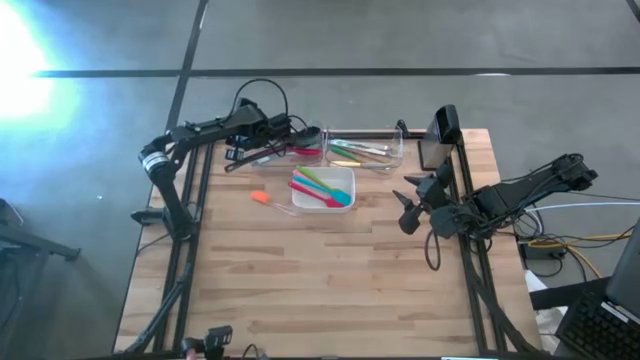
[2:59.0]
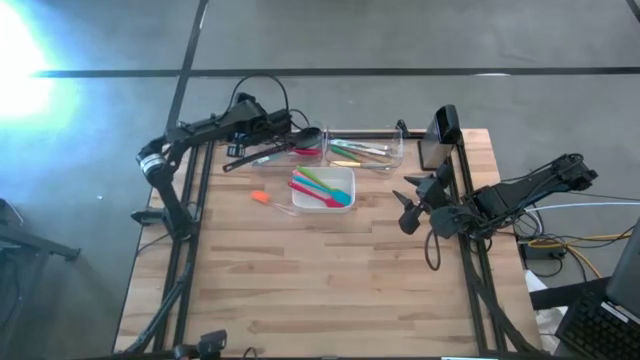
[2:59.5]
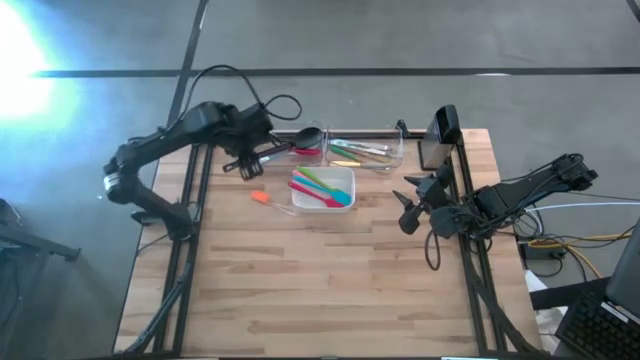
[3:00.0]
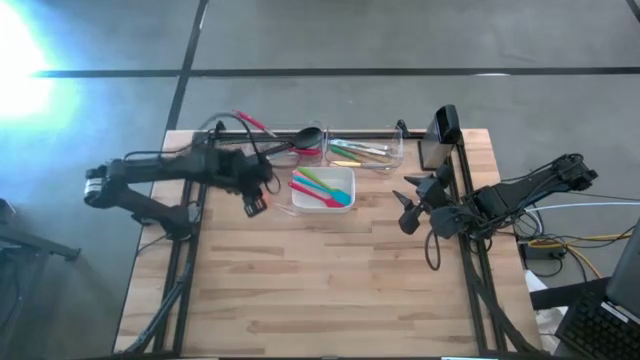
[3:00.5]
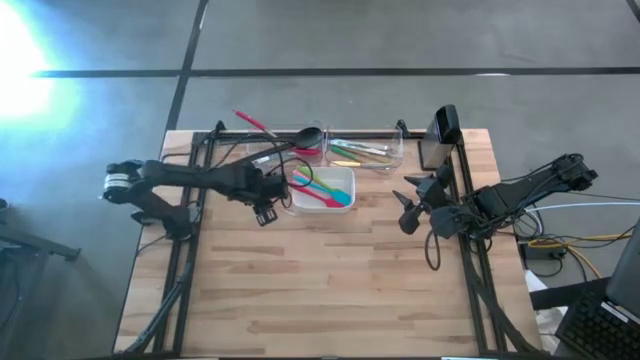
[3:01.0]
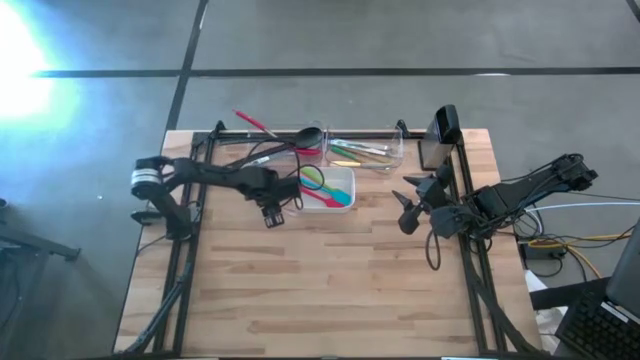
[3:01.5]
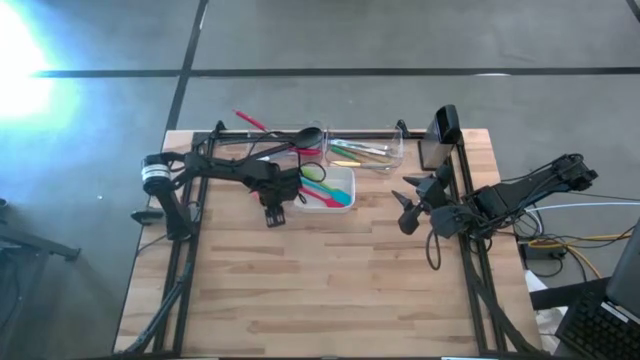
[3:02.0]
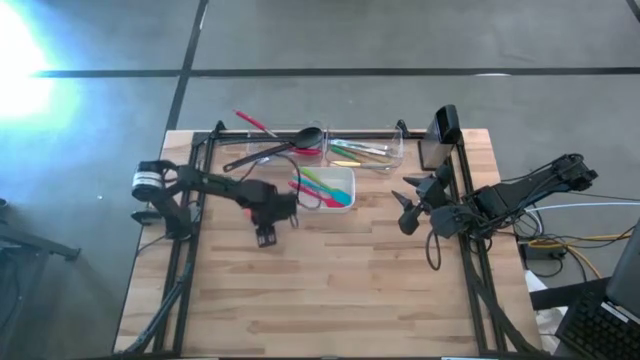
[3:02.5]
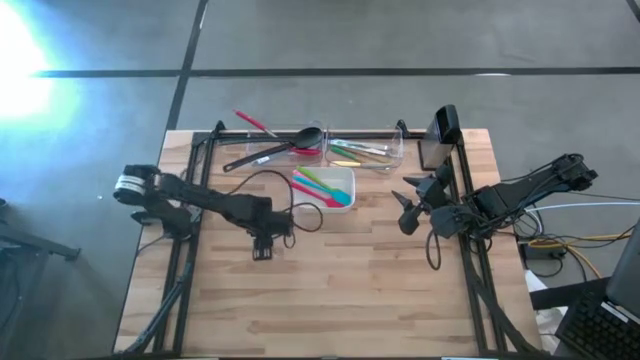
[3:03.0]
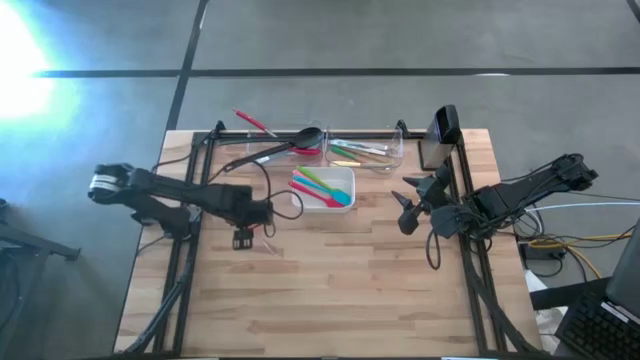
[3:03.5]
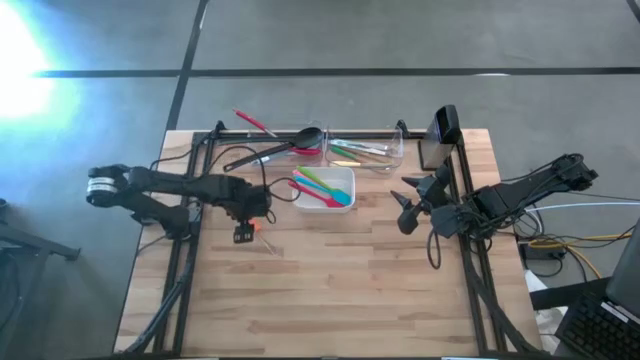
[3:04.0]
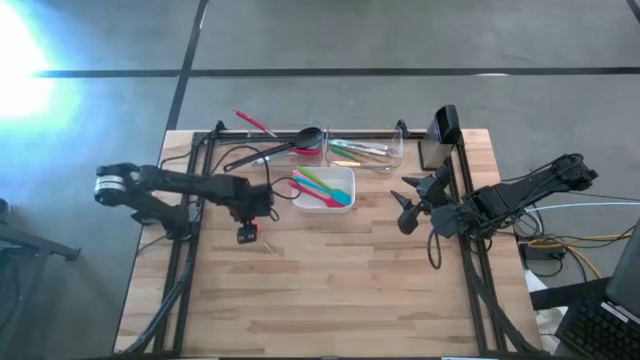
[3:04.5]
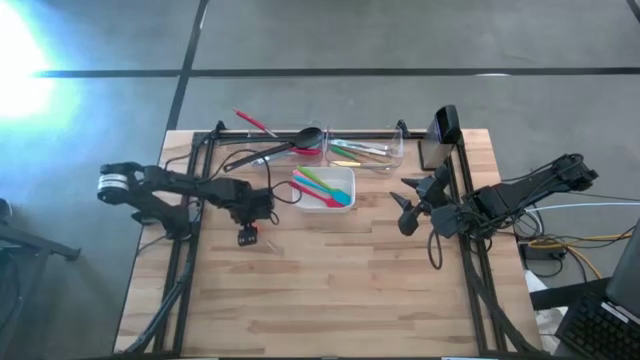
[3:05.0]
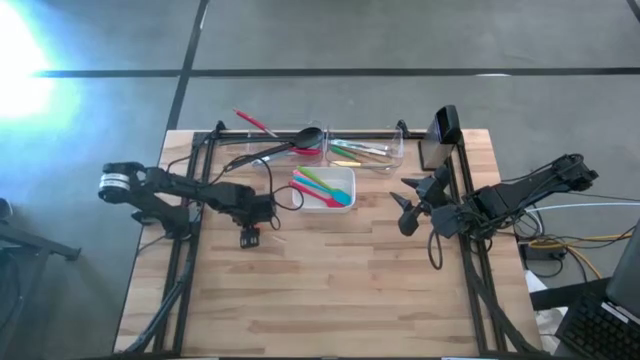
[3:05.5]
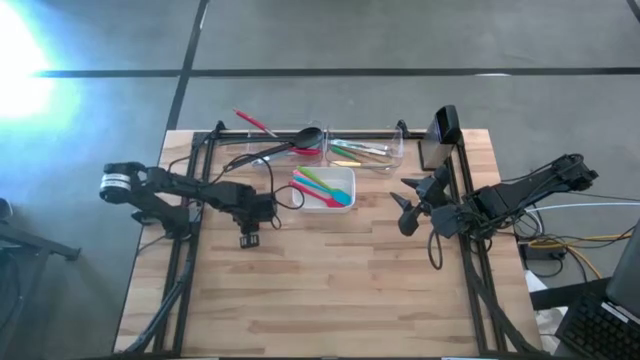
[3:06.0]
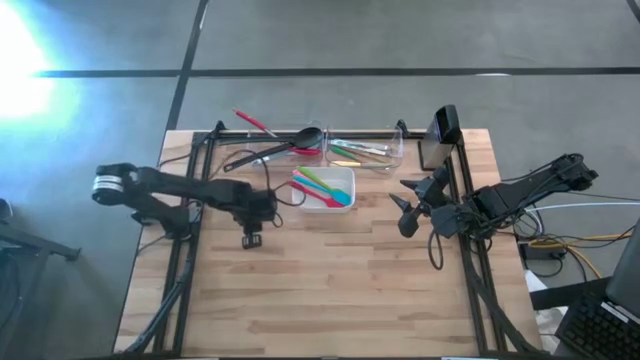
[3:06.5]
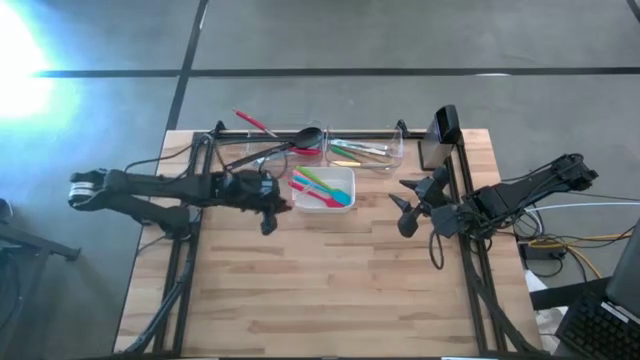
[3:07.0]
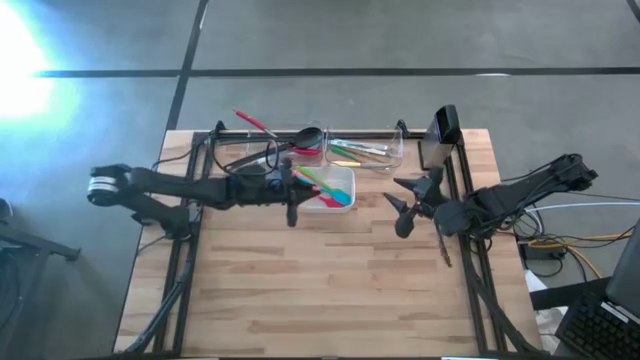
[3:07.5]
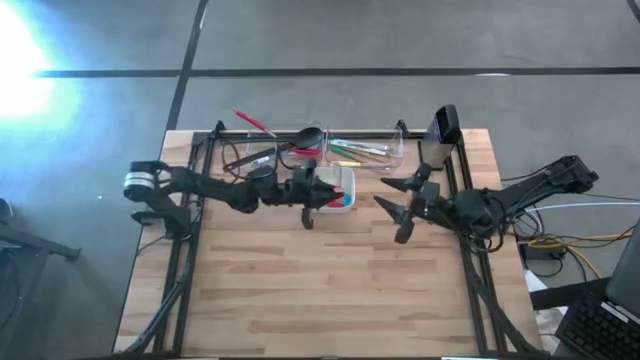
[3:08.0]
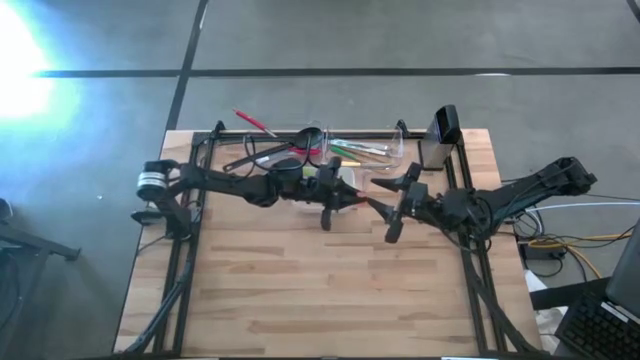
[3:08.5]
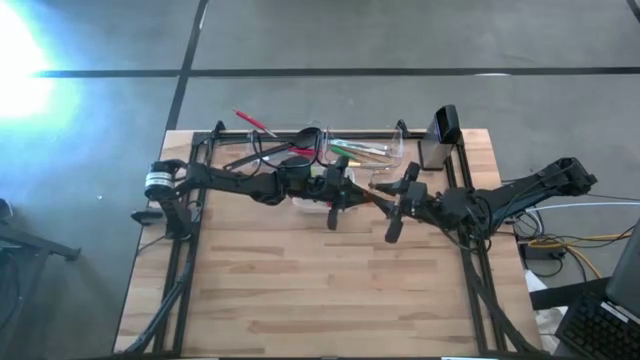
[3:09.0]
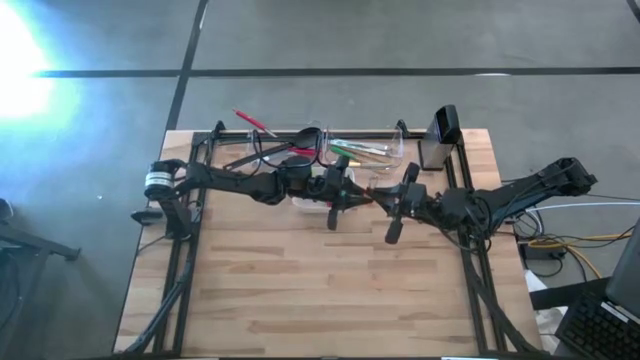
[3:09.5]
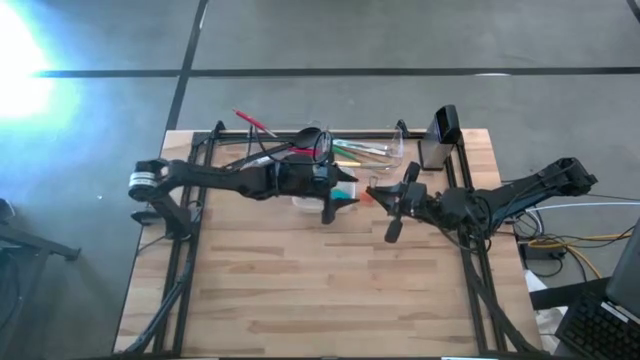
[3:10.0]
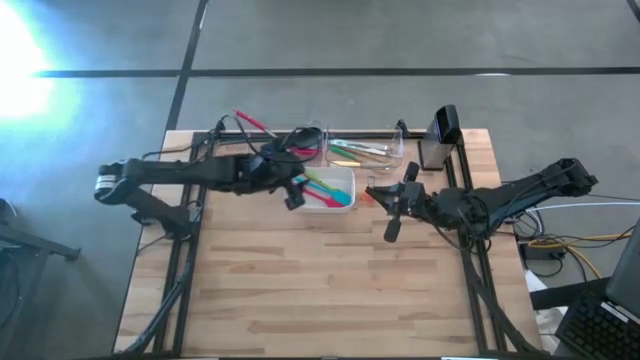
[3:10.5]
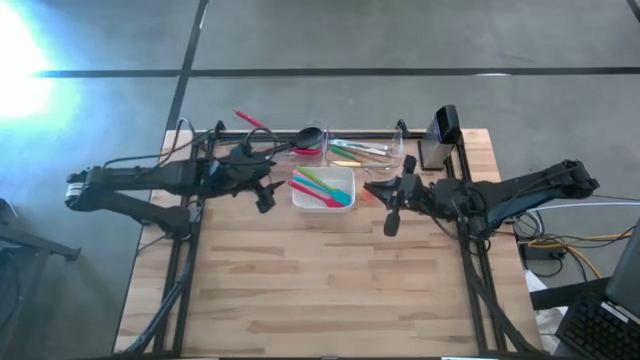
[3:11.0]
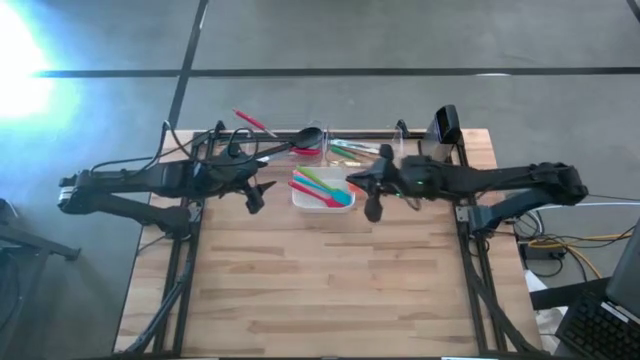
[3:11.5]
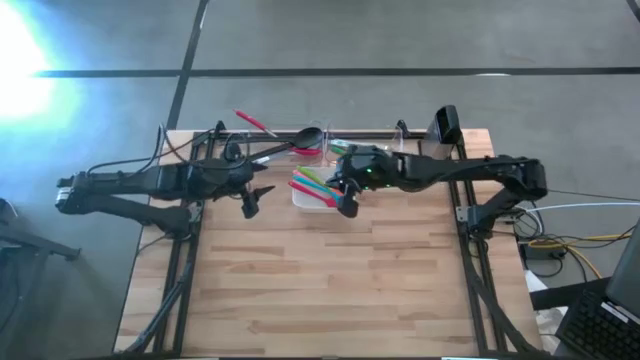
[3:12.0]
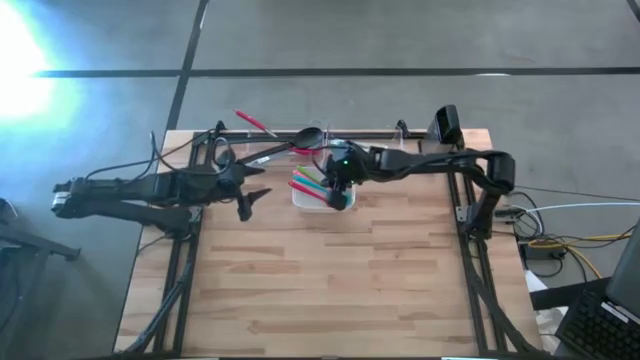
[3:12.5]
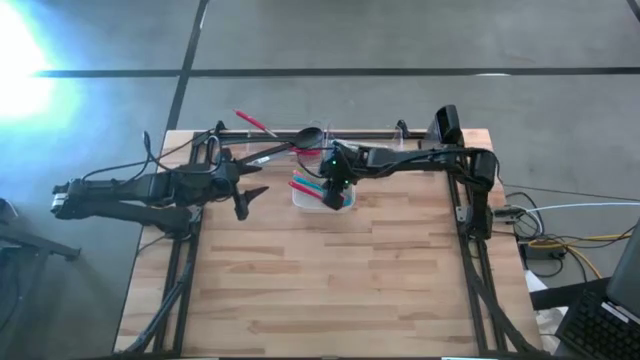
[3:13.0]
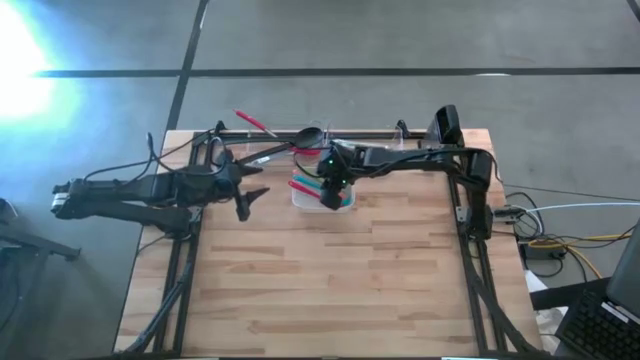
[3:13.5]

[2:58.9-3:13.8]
Task: Pick & Place Kitchen Items
Put the orange spatula into the white bin

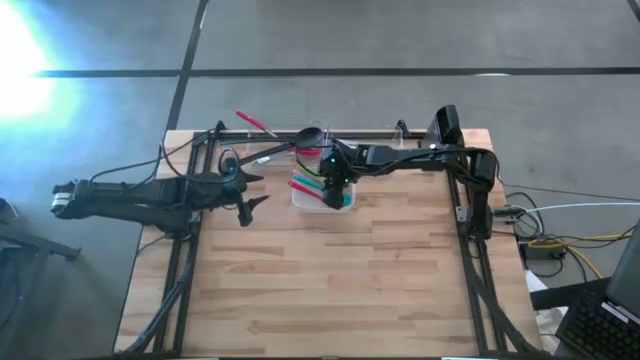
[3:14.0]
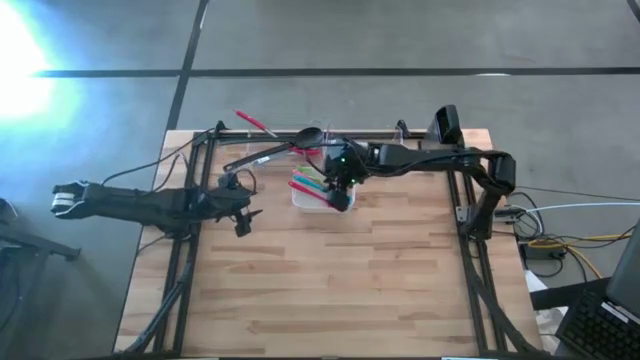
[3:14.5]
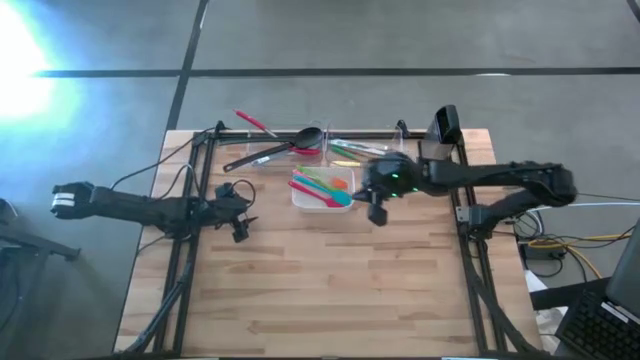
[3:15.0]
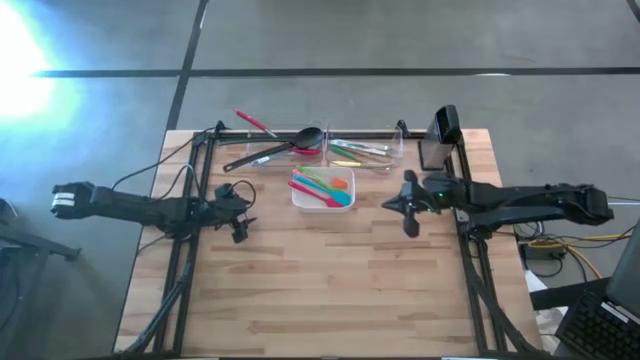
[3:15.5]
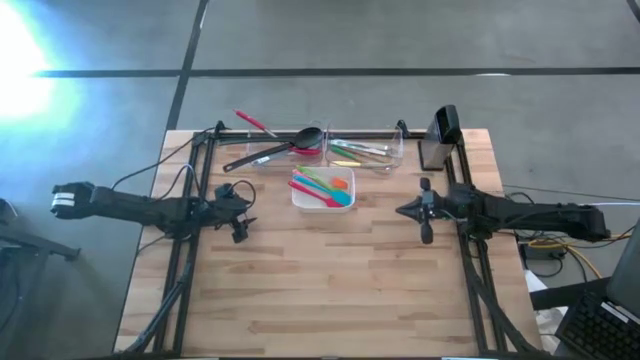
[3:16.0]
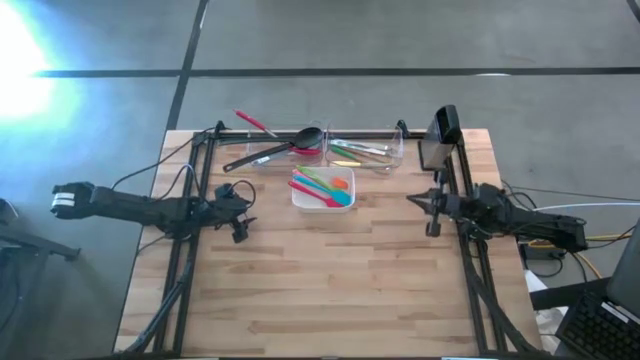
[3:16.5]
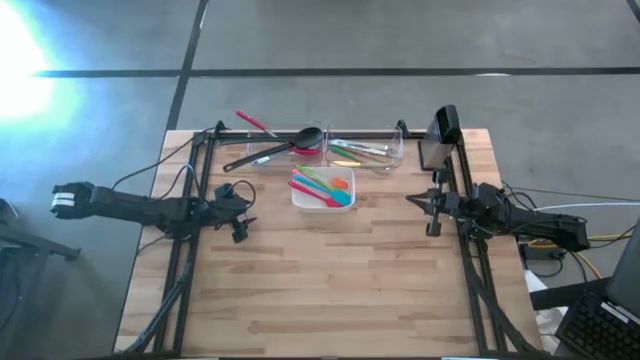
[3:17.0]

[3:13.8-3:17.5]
Return to Home Position

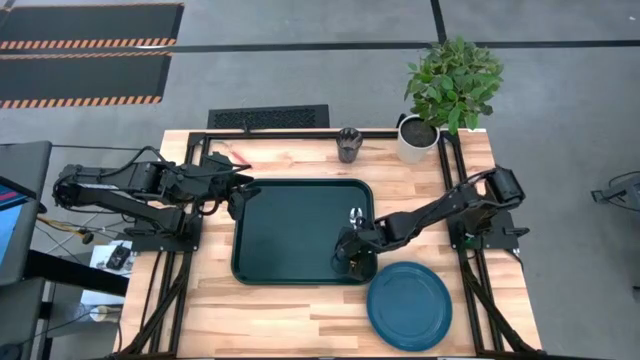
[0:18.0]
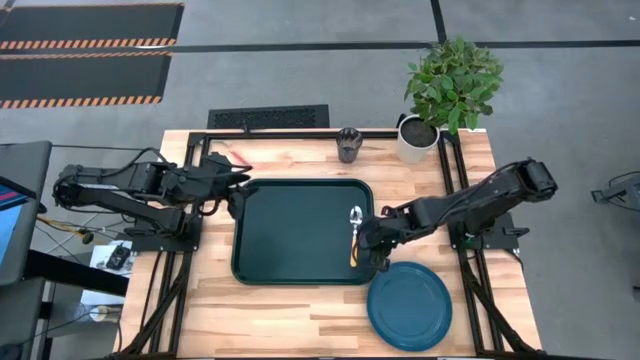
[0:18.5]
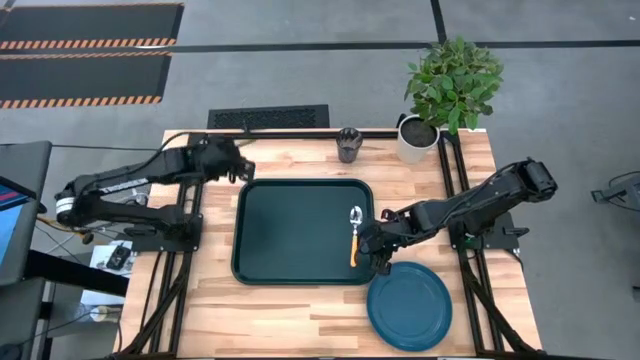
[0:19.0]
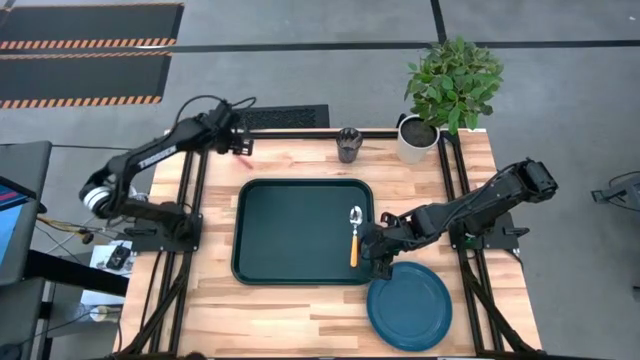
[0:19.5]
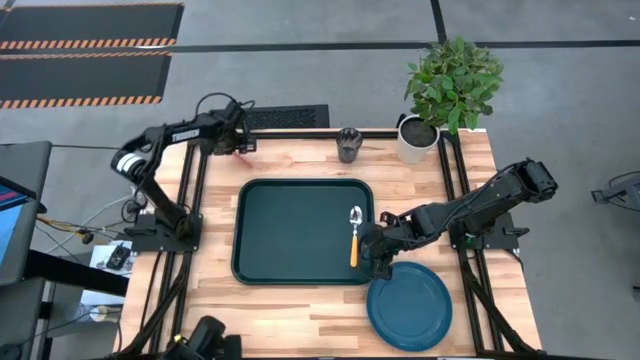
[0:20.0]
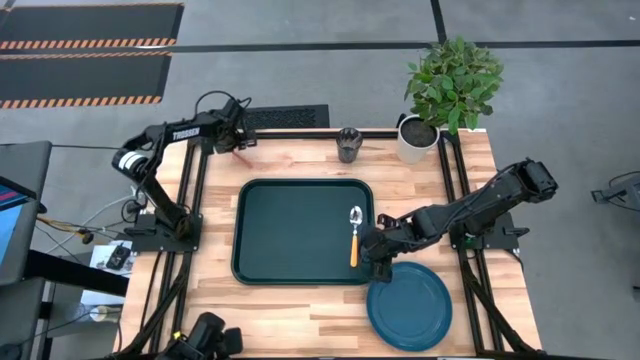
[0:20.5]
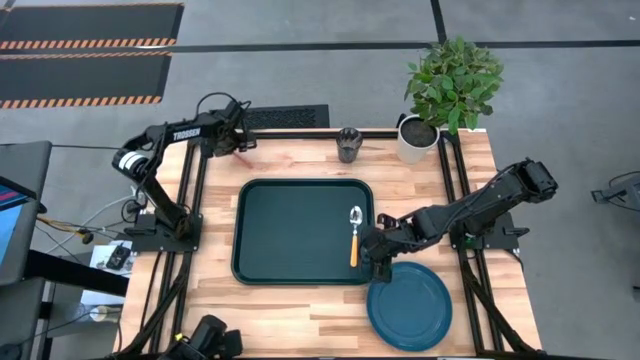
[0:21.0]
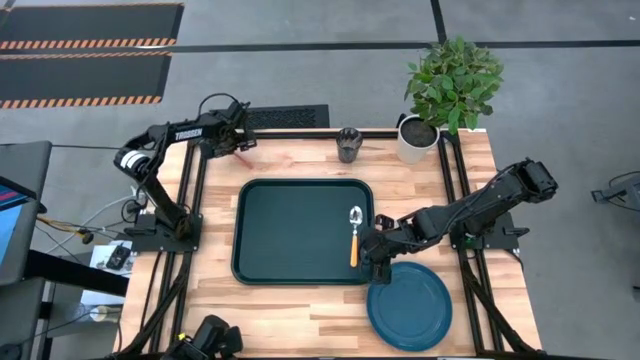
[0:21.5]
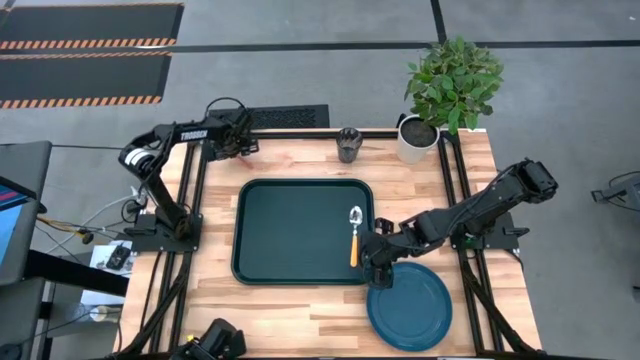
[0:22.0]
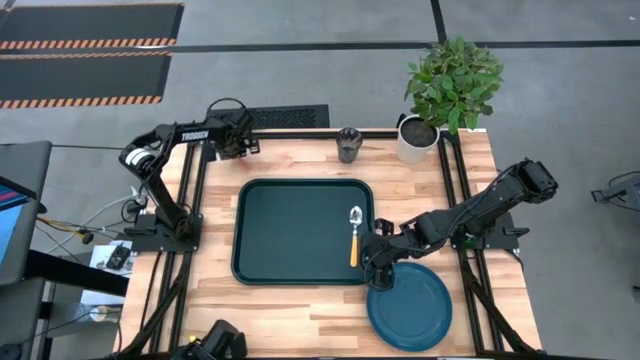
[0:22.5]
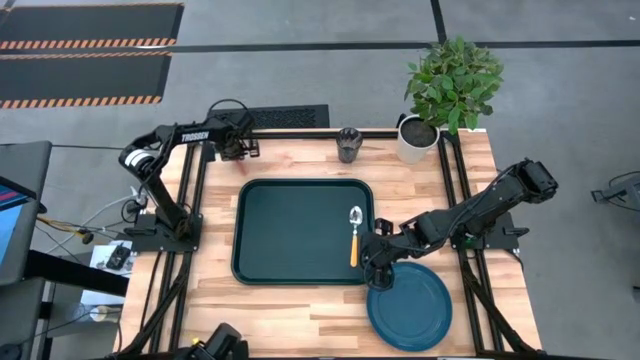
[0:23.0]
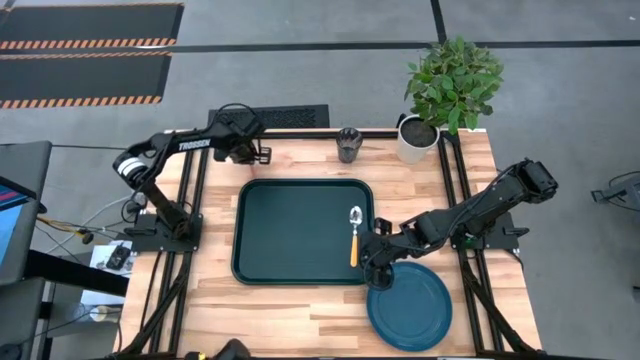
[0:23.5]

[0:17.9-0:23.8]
Task: Pick and place plate/cup/fork/spoon on tray
Put the pink fork on the black serving tray
